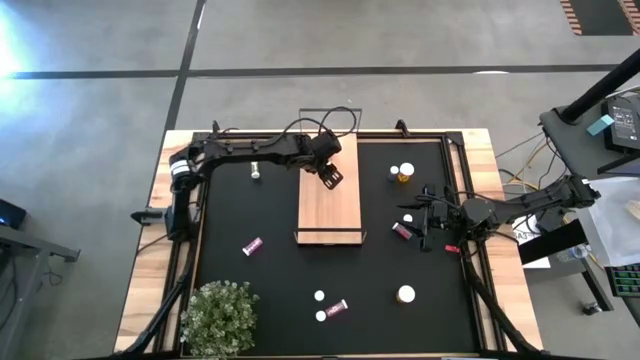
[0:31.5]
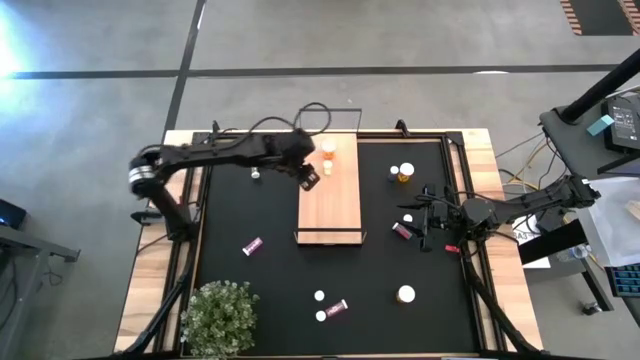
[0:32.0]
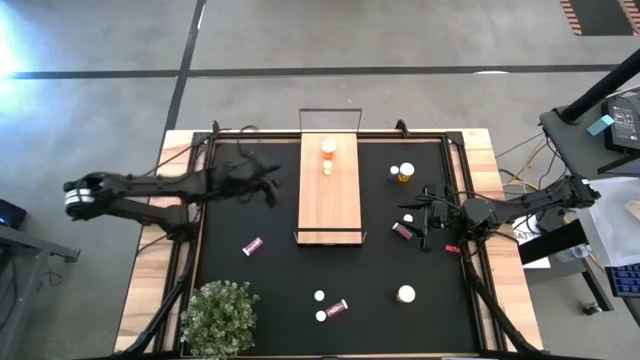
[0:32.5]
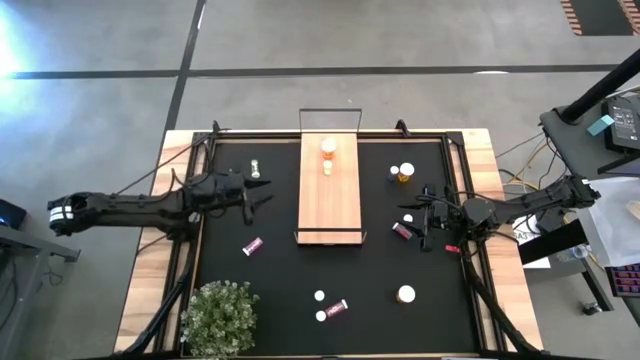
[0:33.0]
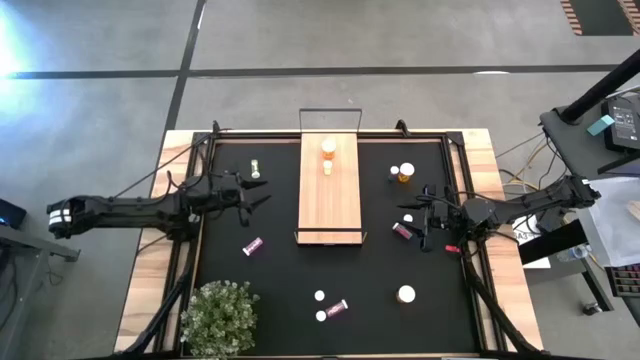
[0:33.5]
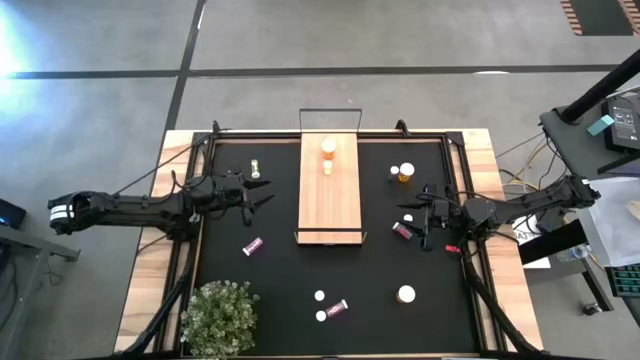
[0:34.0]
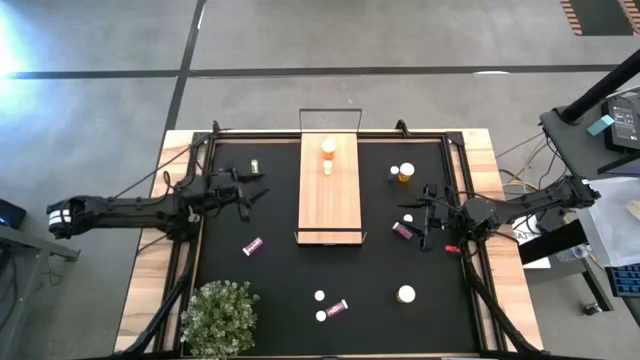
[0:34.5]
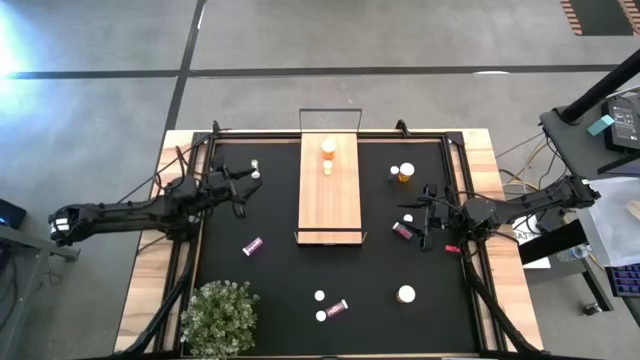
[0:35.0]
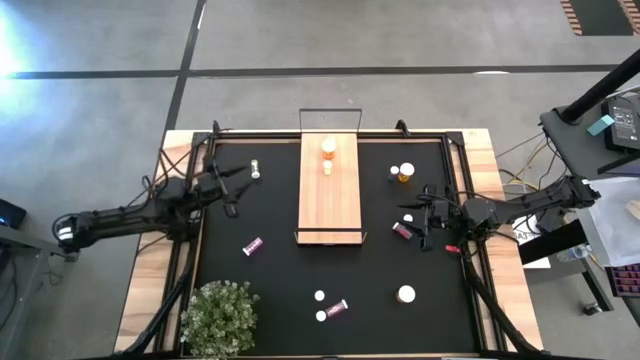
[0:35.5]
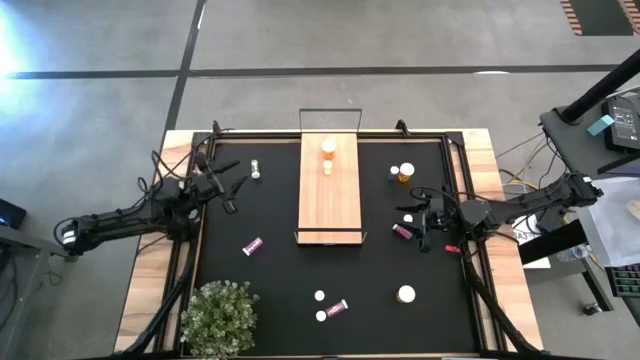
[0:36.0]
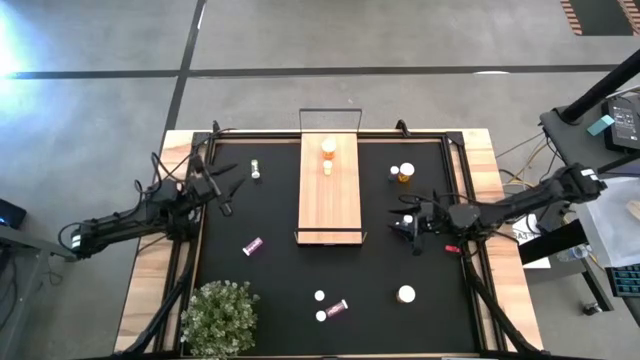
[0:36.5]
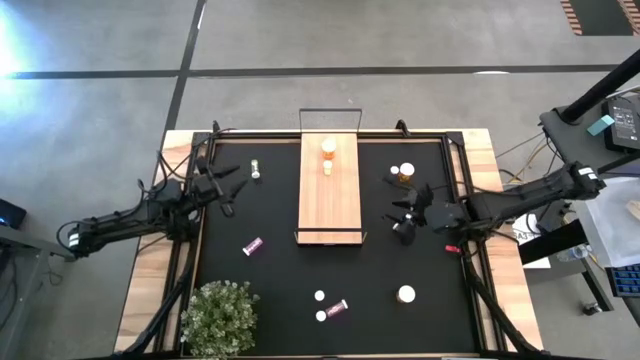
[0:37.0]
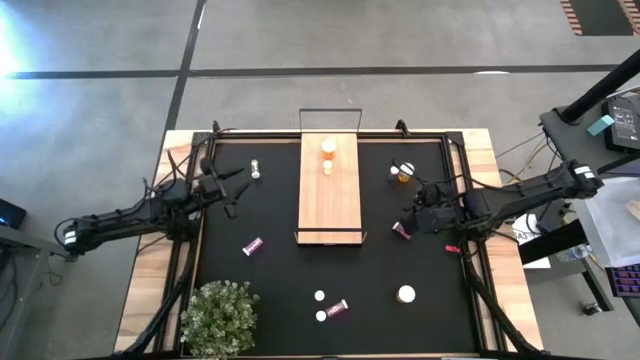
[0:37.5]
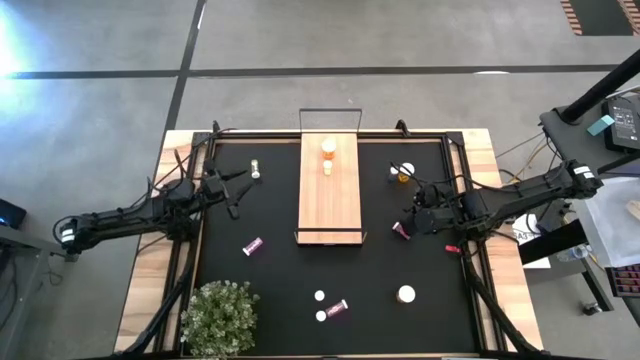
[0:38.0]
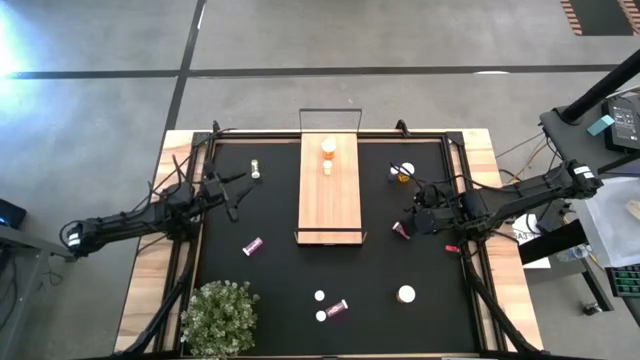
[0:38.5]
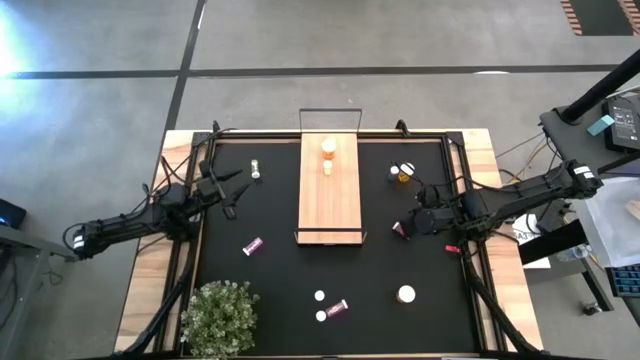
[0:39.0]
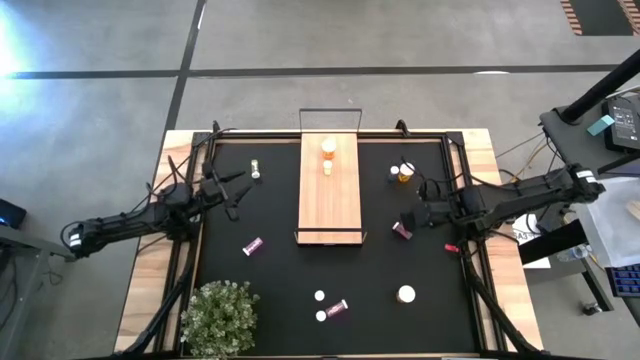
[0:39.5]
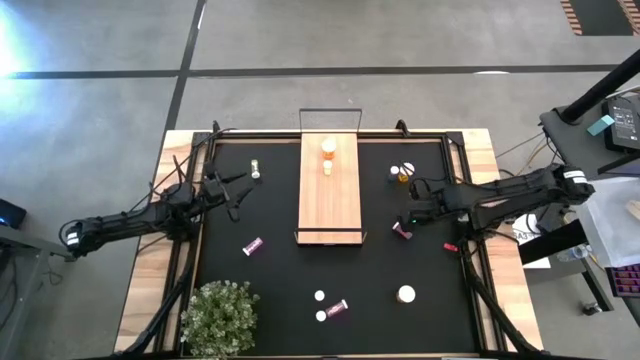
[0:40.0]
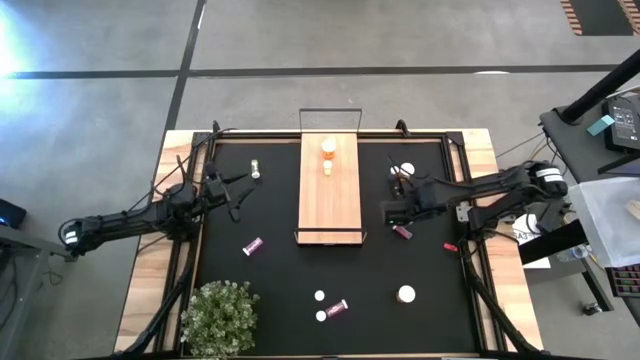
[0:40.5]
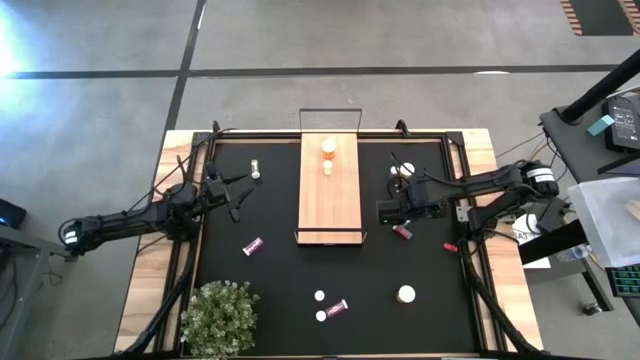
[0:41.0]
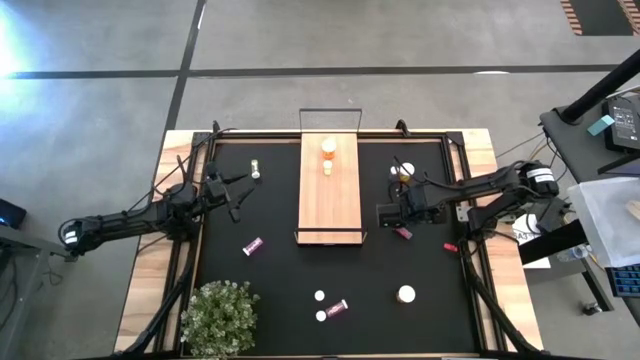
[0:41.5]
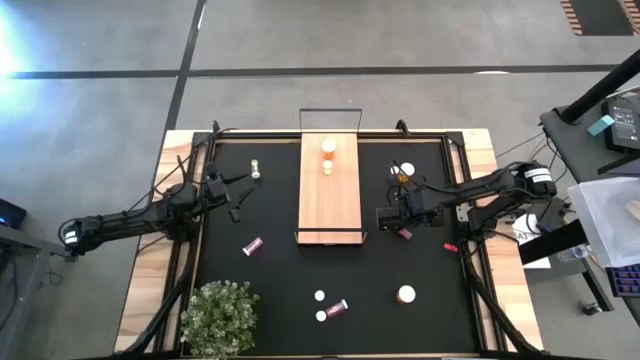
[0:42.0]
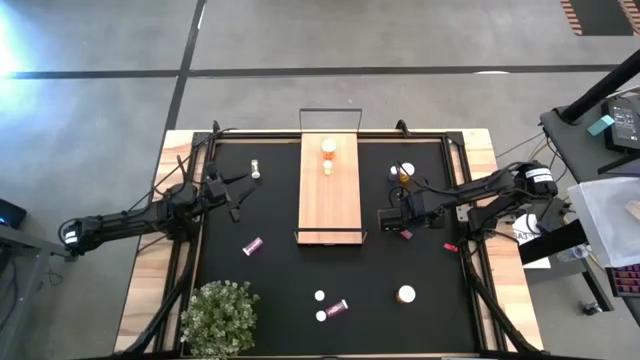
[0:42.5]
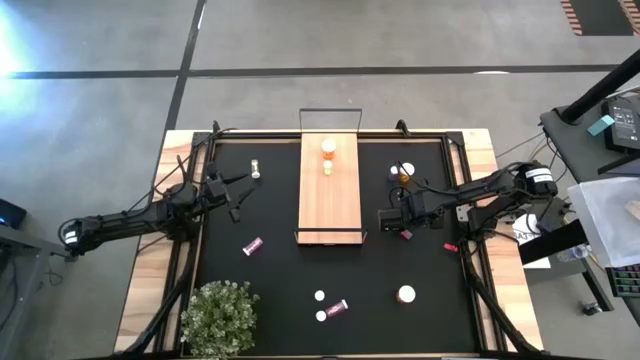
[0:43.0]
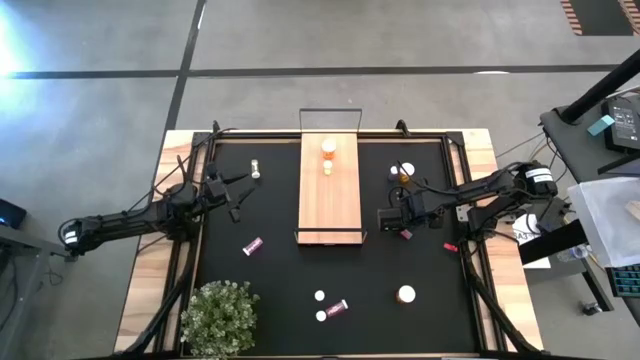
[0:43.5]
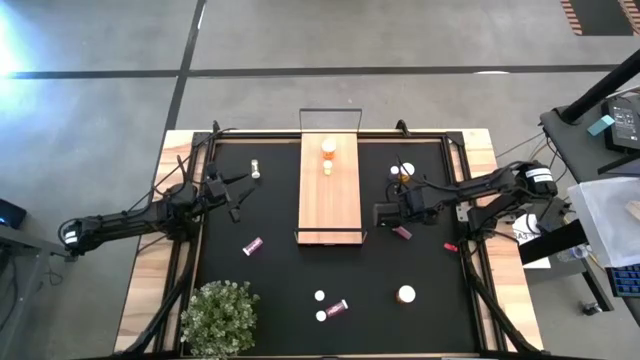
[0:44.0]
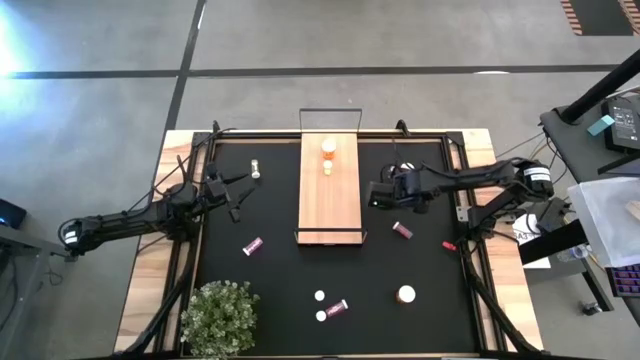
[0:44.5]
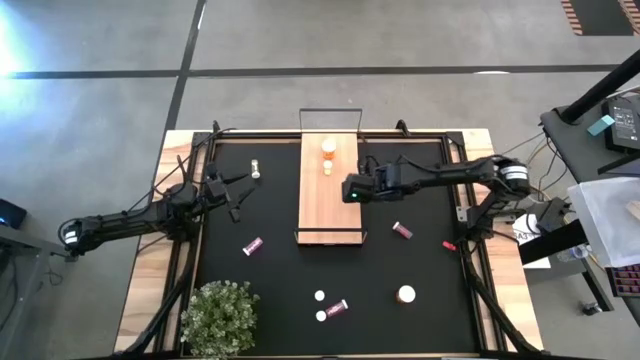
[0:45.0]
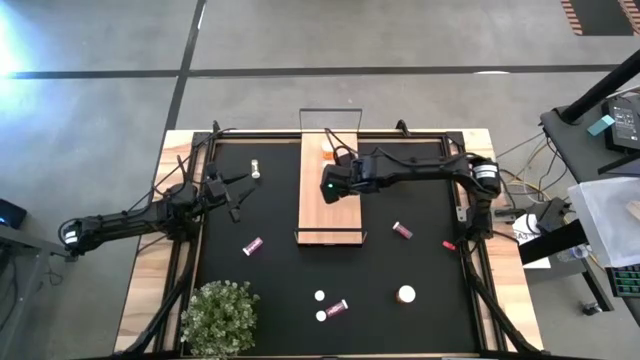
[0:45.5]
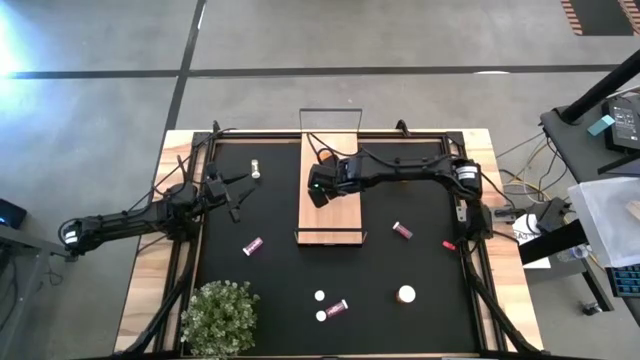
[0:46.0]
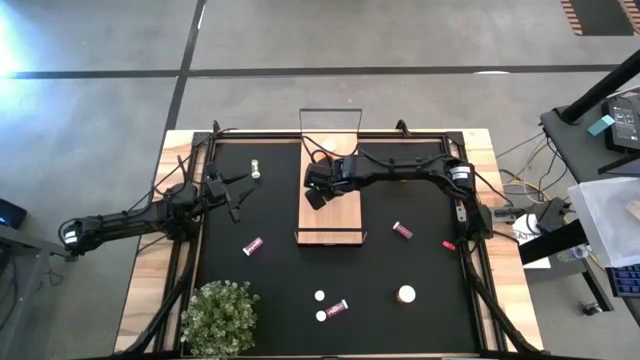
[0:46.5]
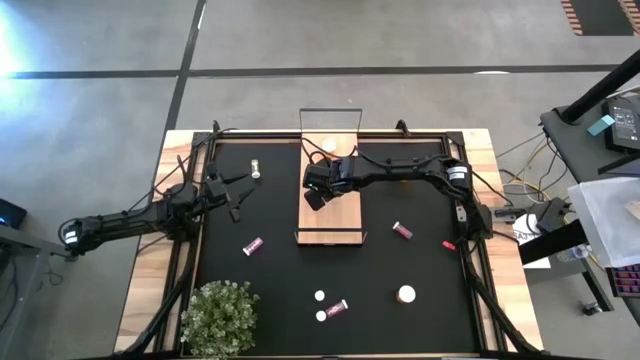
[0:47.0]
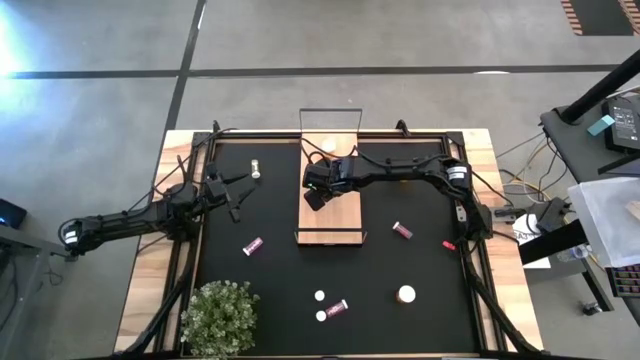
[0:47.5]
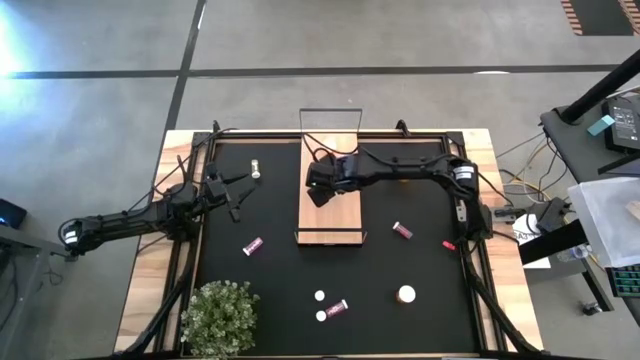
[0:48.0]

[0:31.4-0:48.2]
Task: Pick and place medicine bottles onto shelf by color
Put the middle right blue medicine bottle on the shelf
